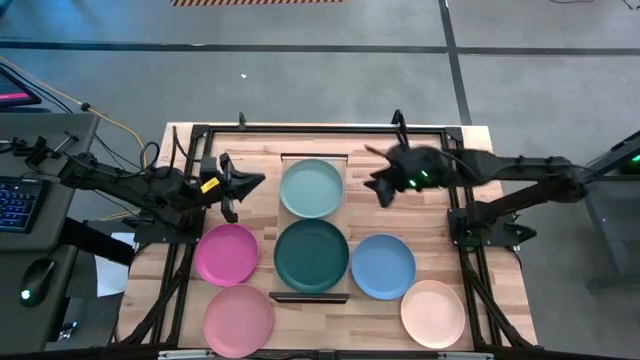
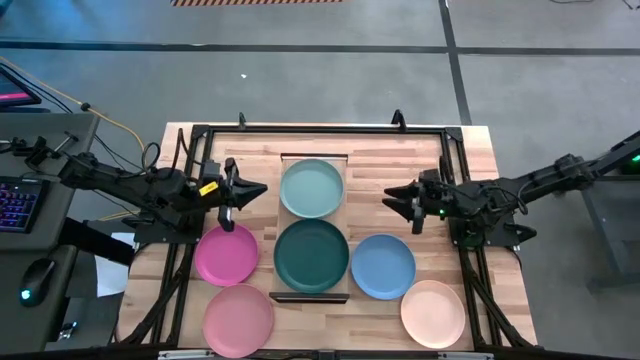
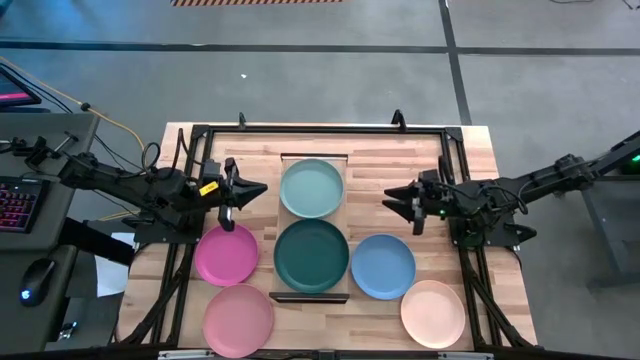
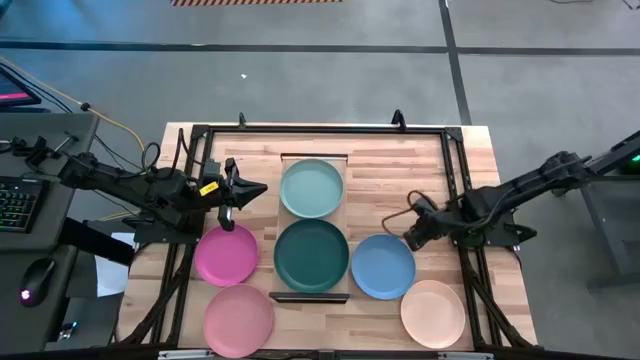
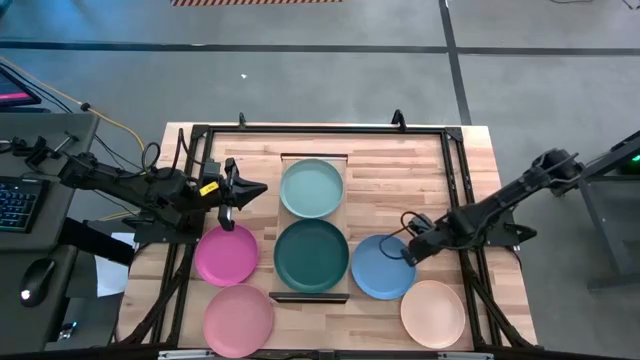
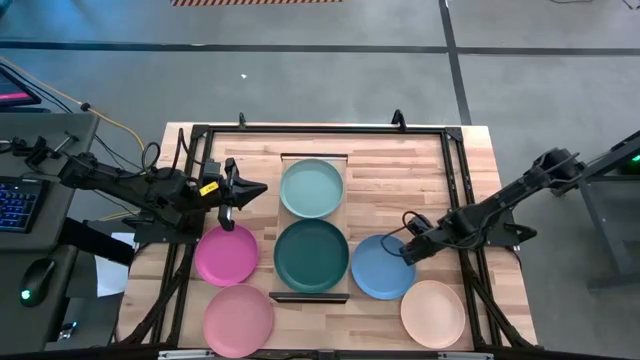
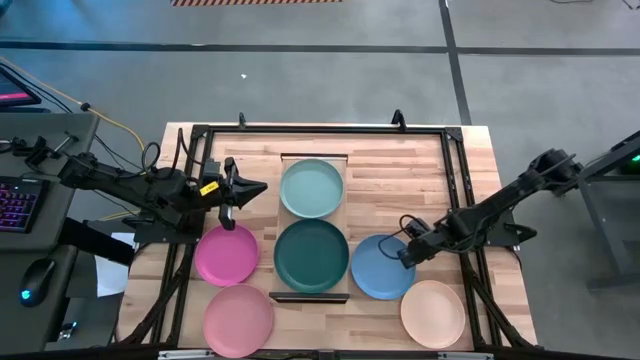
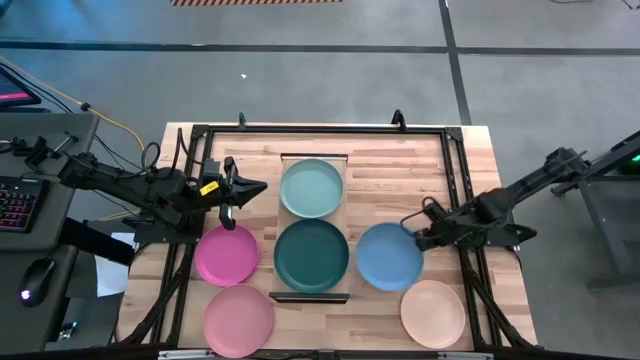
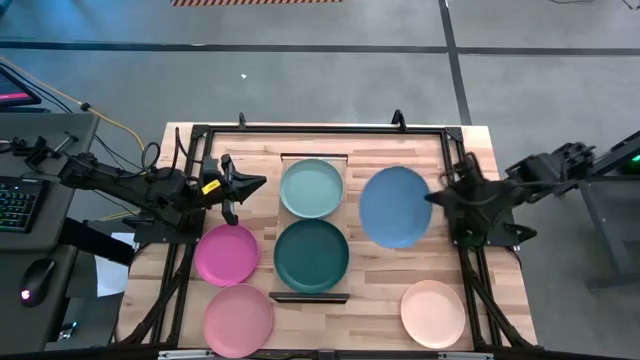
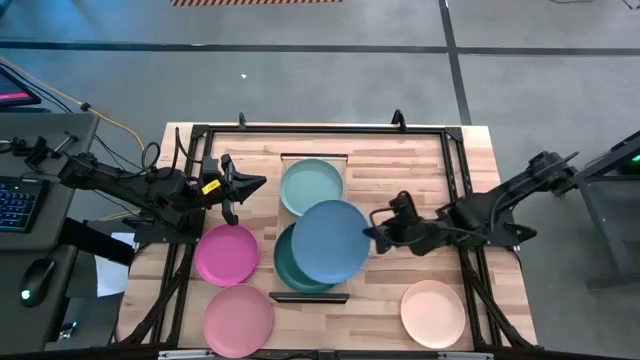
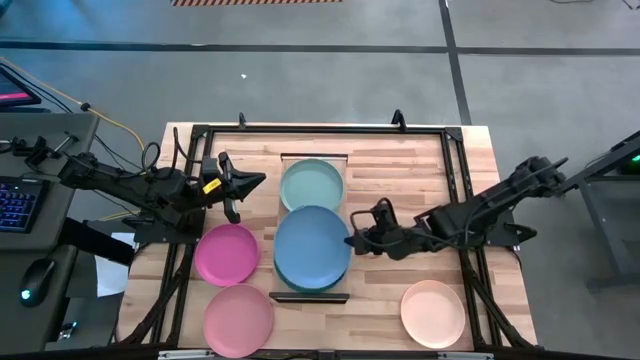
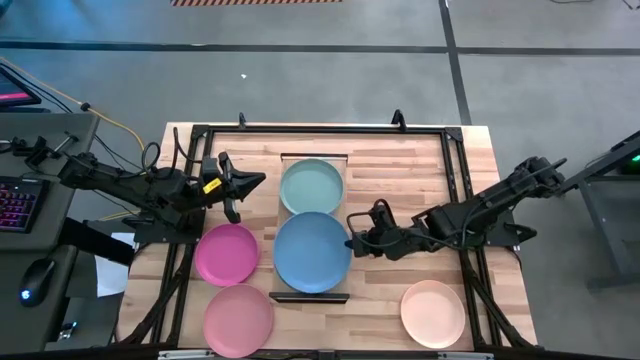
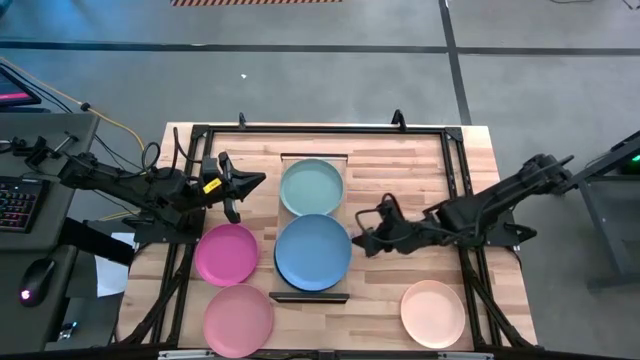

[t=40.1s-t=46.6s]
Task: Place and stack plates onto a shelf
Stack the blue plate on top of the green plate on the shelf

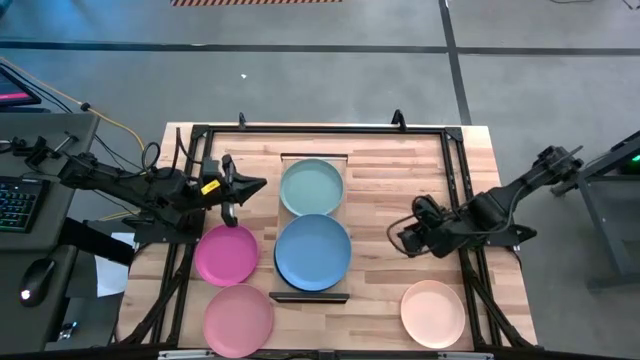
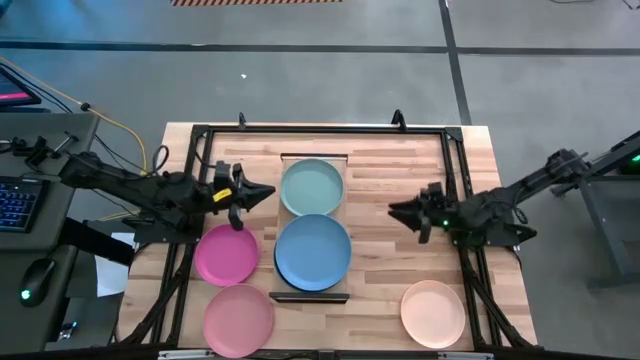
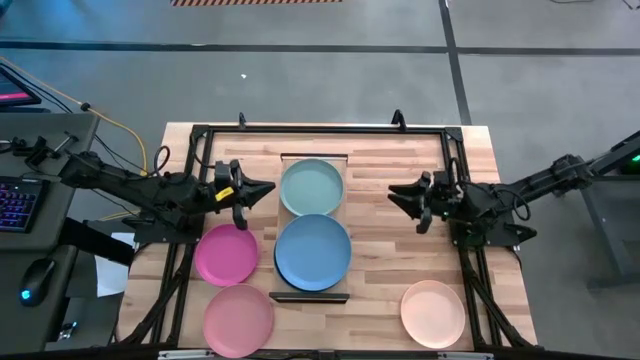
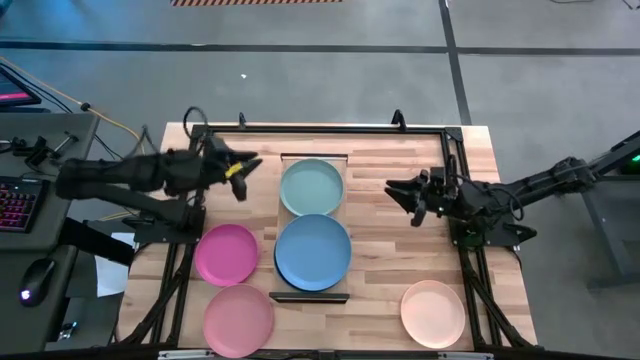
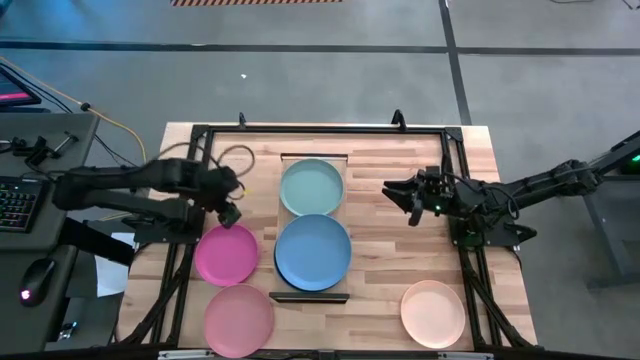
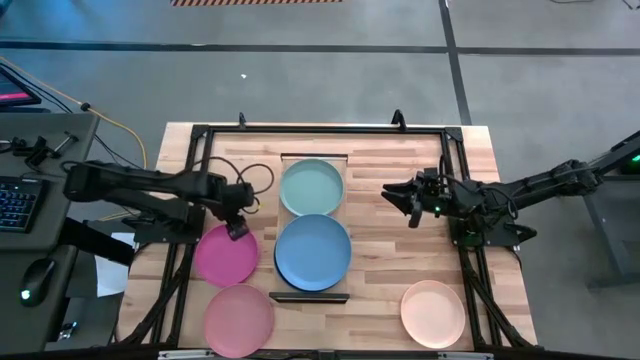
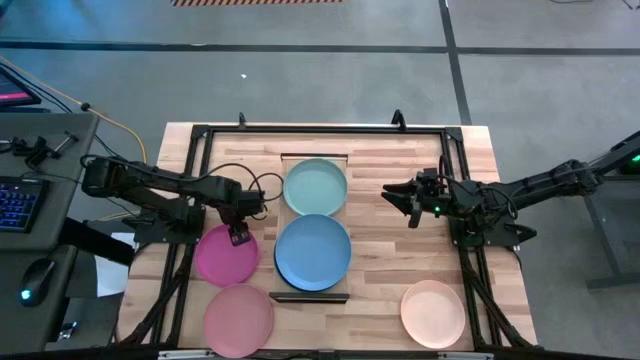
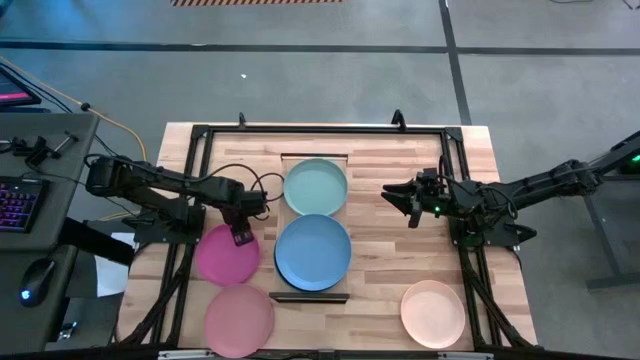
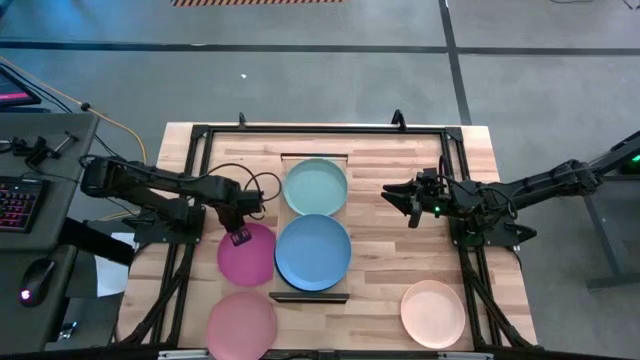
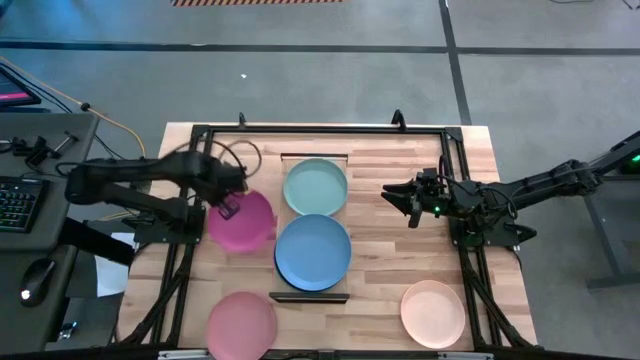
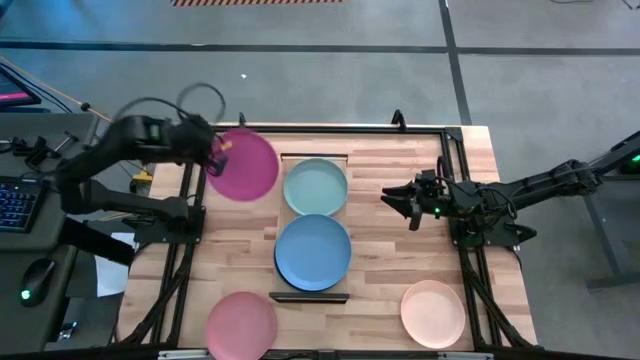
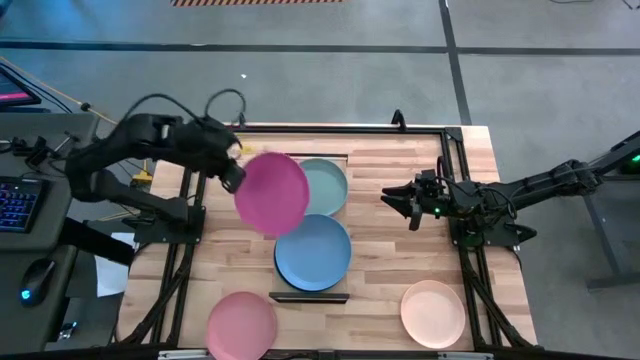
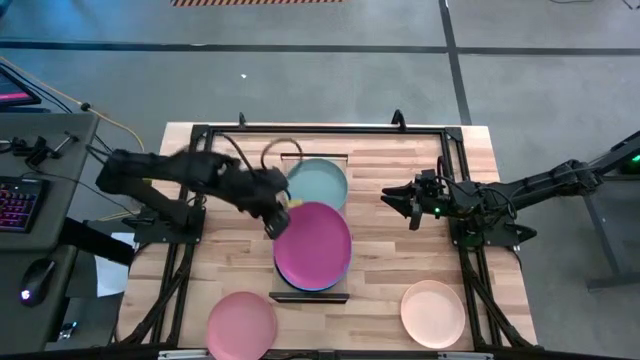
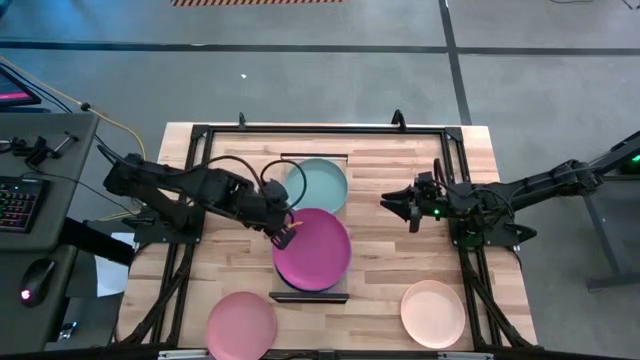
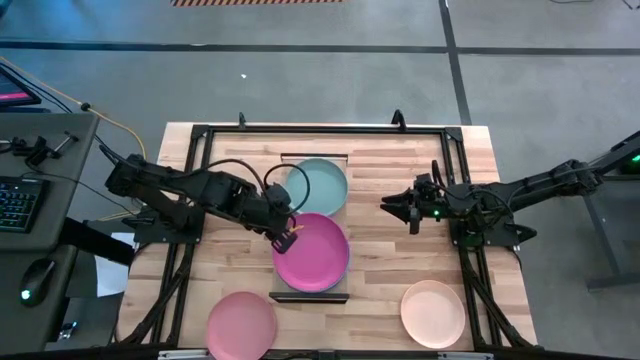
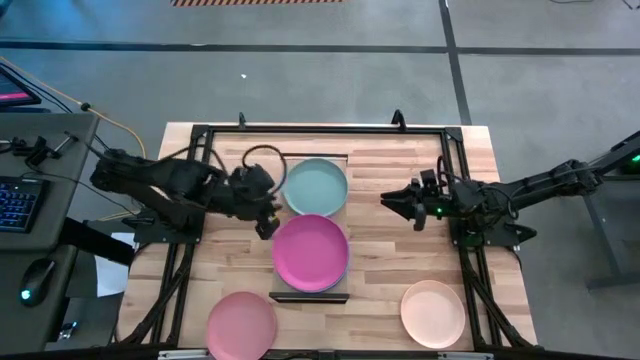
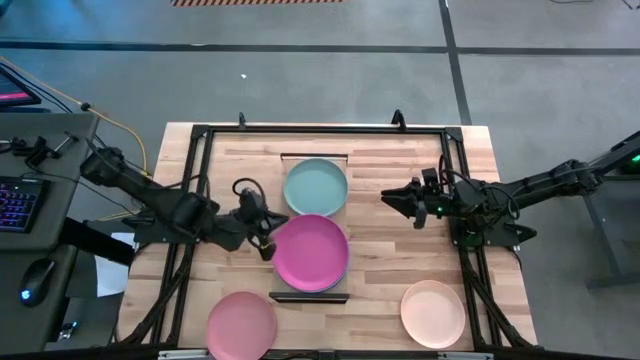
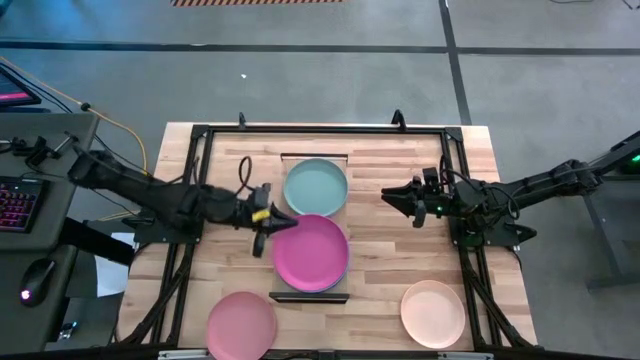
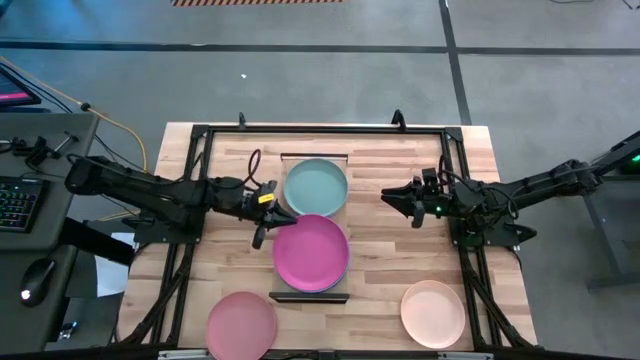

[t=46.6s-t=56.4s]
Stack the pink plate on top of the blue plate on the shelf

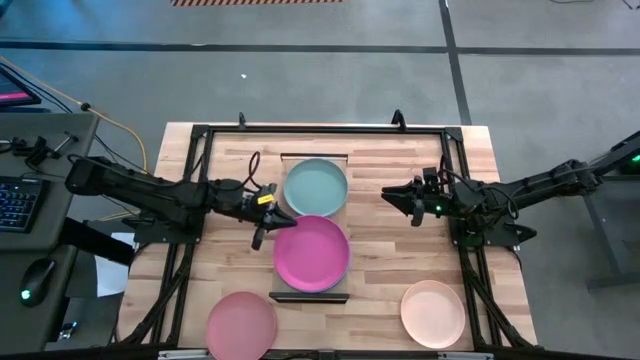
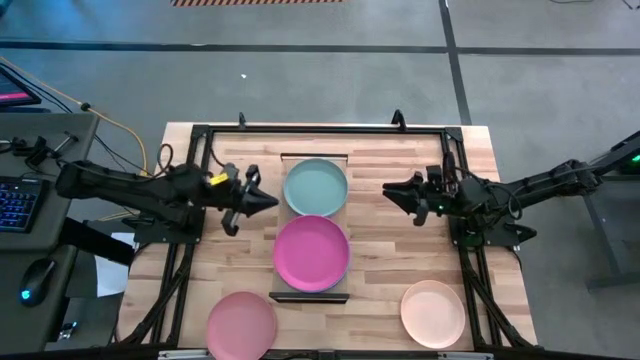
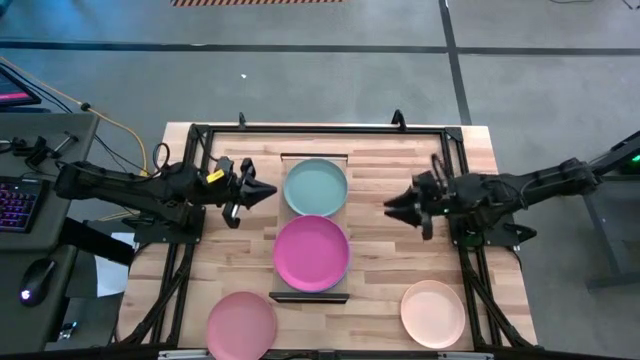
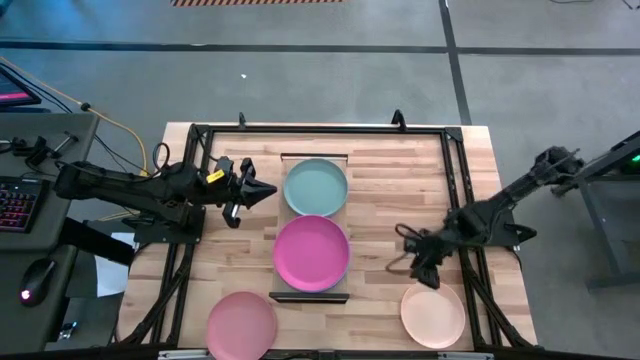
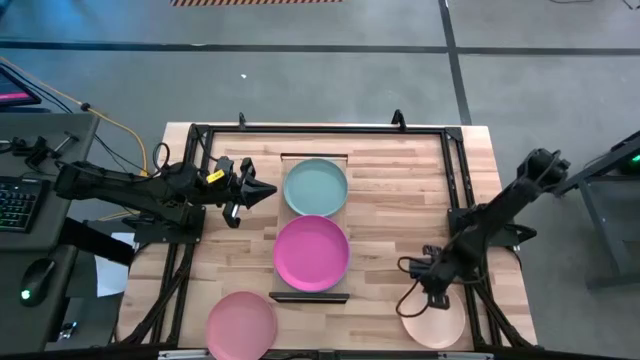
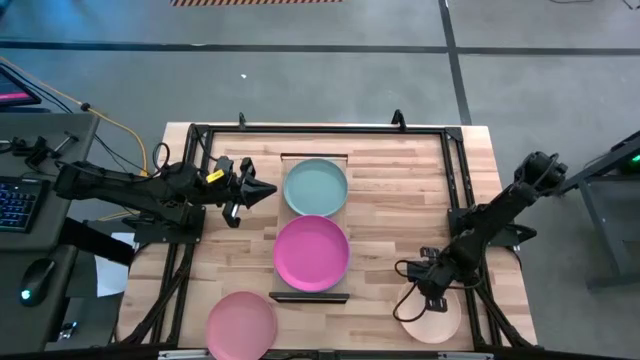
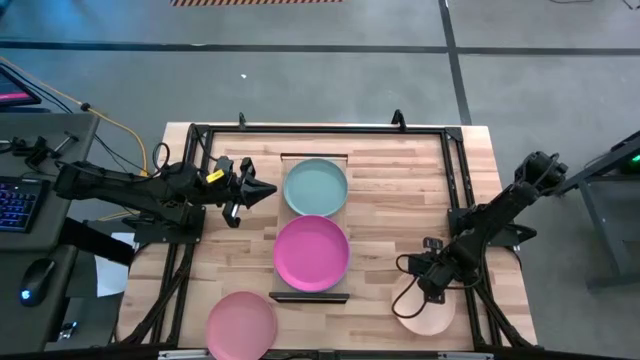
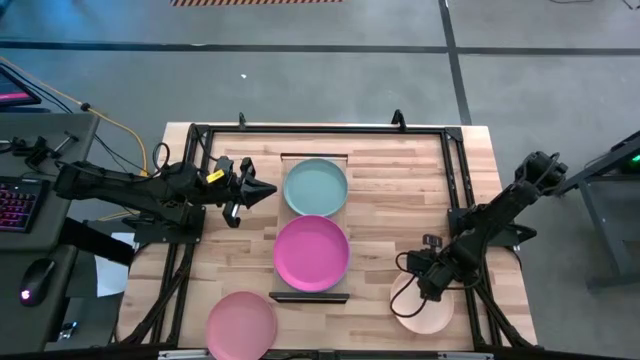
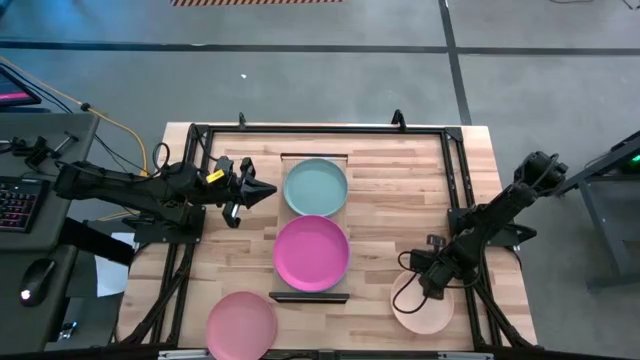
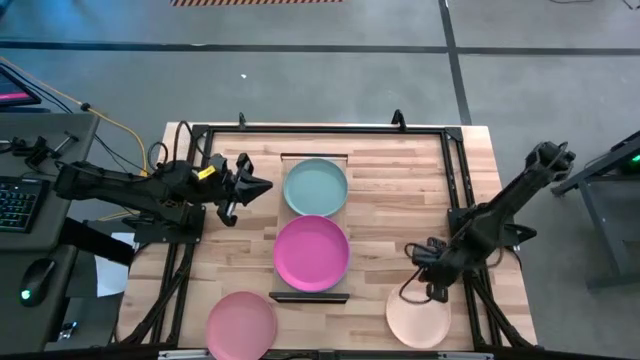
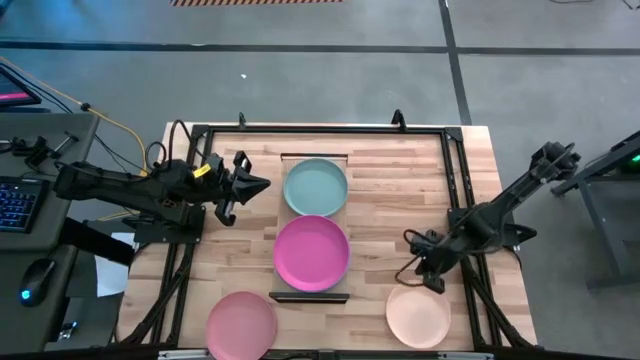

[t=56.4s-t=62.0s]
Stack the light brown plate on top of the blue plate on the shelf
